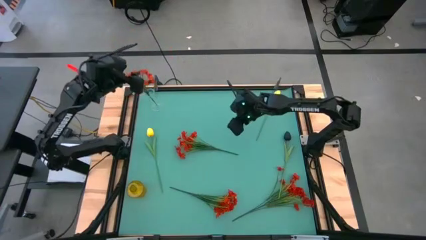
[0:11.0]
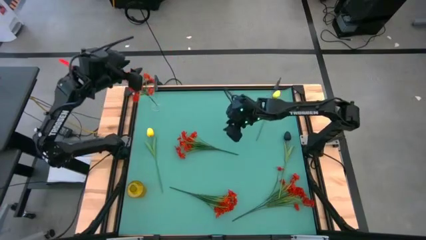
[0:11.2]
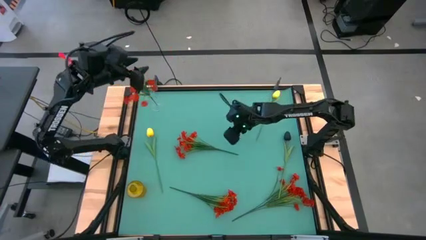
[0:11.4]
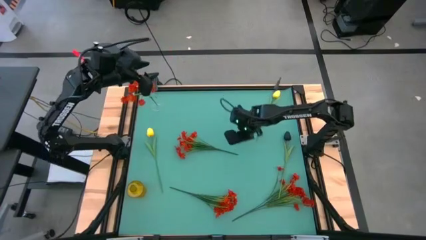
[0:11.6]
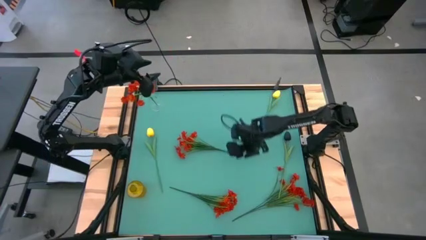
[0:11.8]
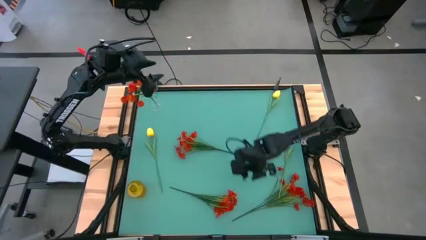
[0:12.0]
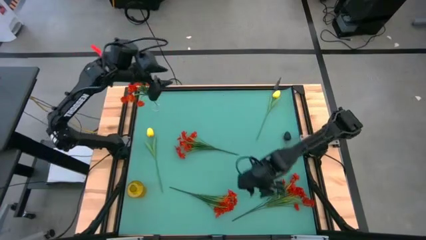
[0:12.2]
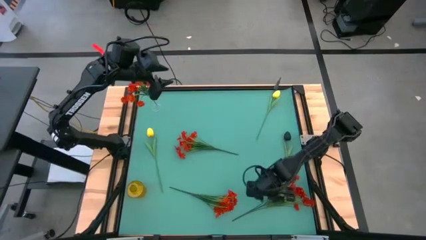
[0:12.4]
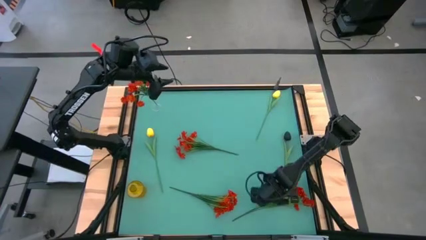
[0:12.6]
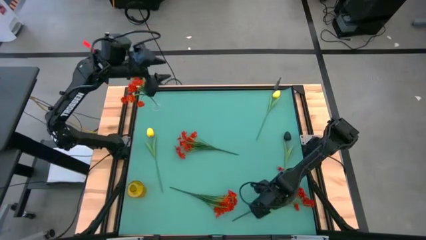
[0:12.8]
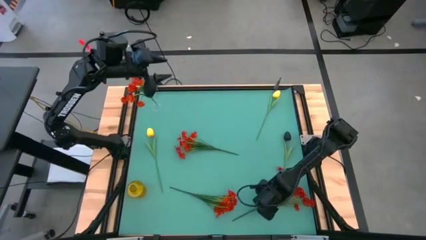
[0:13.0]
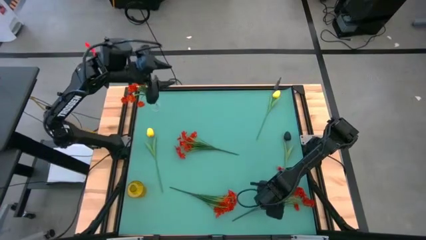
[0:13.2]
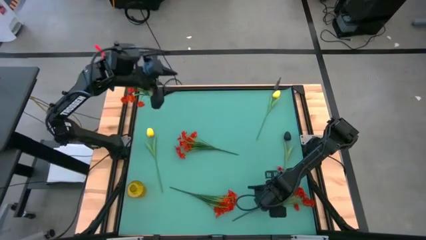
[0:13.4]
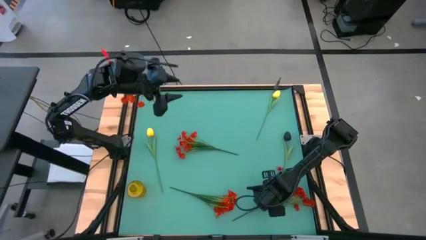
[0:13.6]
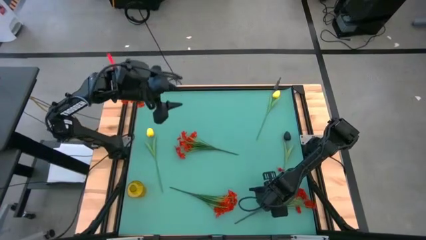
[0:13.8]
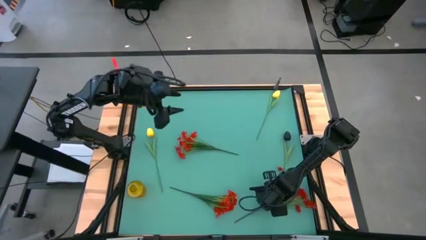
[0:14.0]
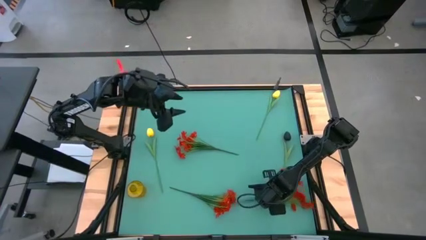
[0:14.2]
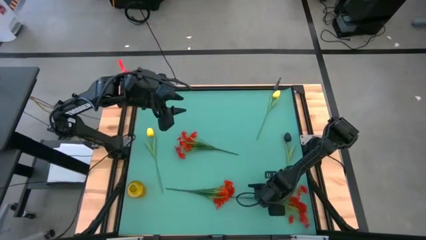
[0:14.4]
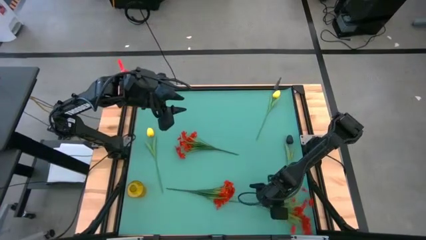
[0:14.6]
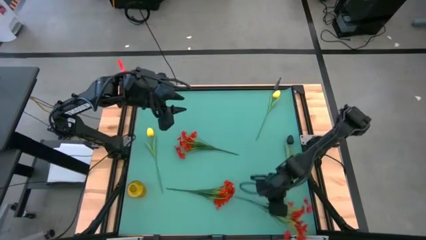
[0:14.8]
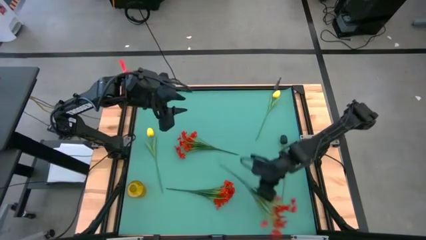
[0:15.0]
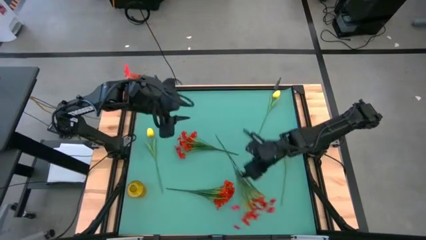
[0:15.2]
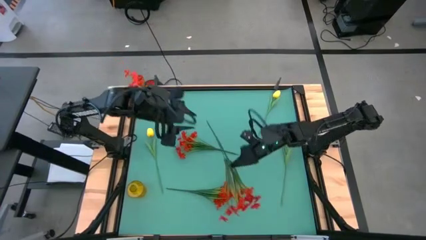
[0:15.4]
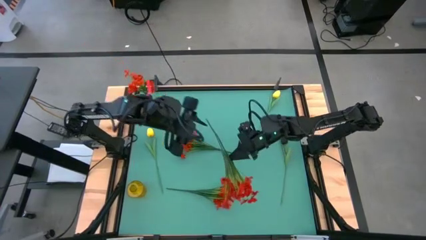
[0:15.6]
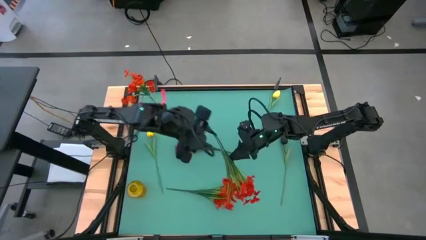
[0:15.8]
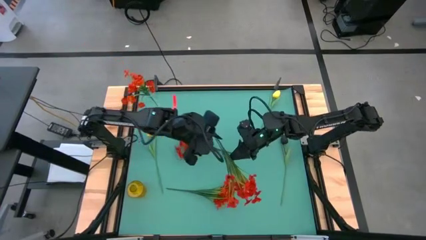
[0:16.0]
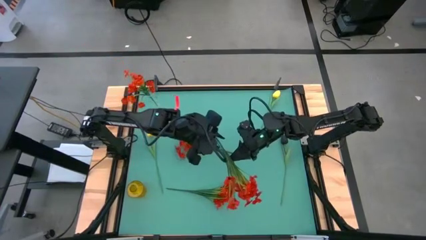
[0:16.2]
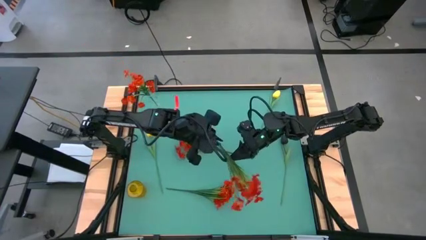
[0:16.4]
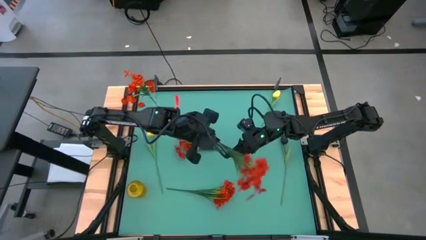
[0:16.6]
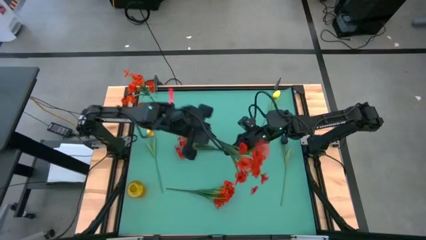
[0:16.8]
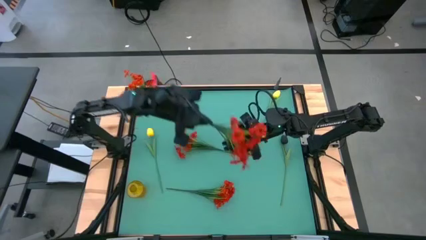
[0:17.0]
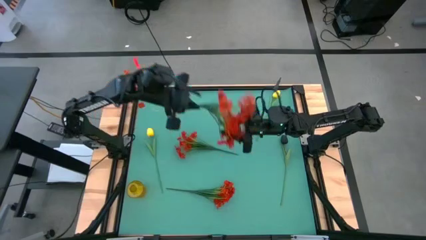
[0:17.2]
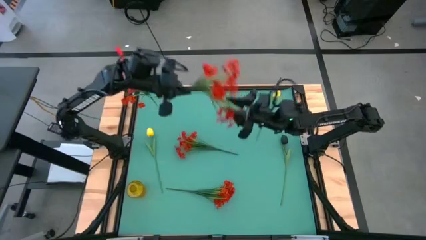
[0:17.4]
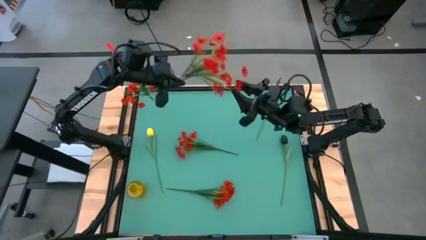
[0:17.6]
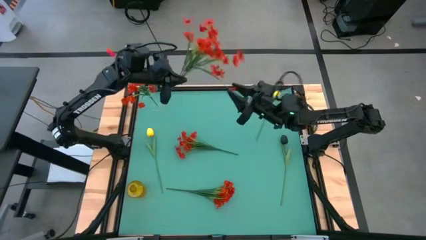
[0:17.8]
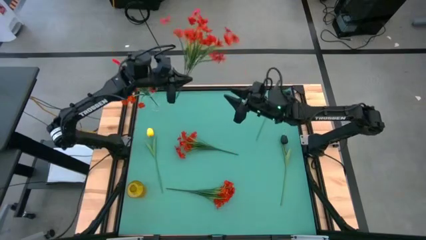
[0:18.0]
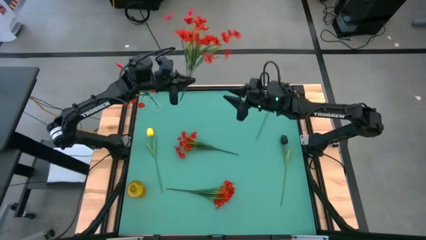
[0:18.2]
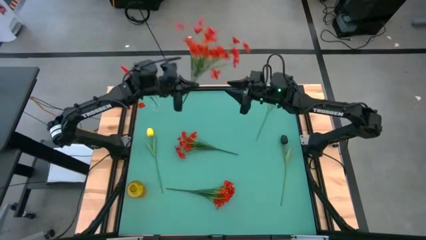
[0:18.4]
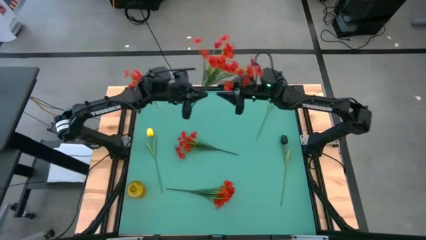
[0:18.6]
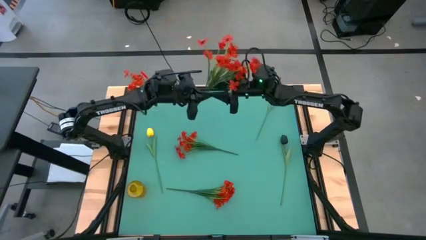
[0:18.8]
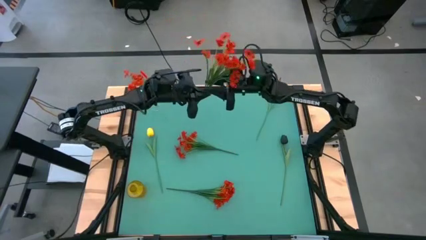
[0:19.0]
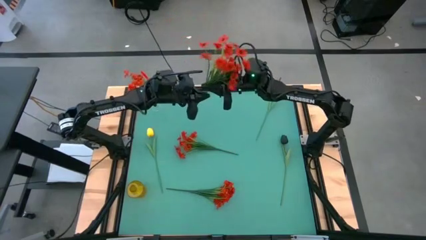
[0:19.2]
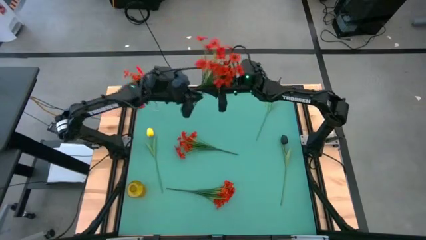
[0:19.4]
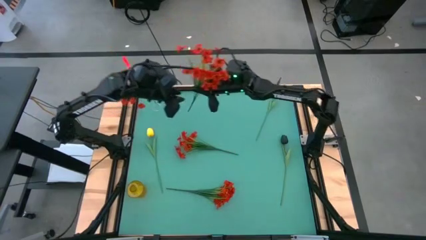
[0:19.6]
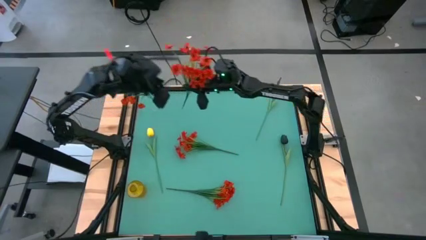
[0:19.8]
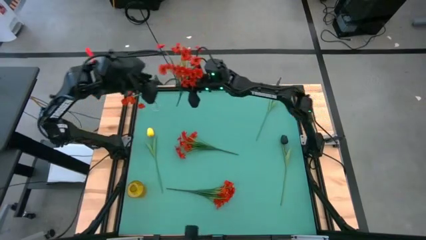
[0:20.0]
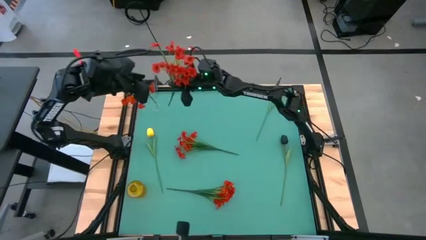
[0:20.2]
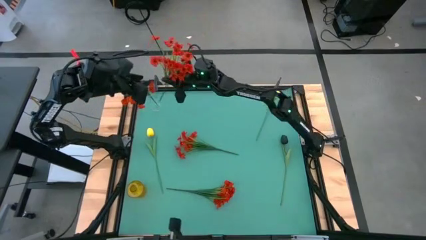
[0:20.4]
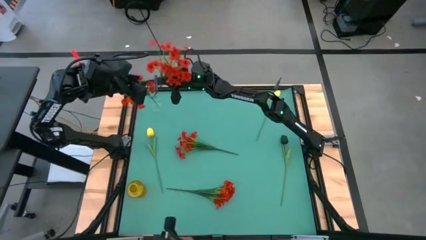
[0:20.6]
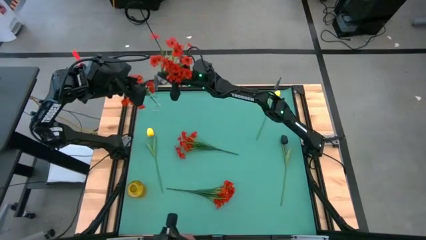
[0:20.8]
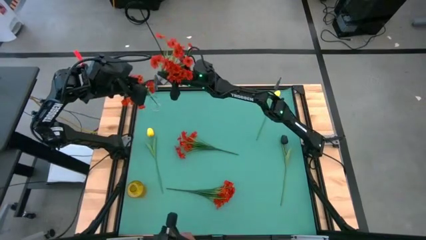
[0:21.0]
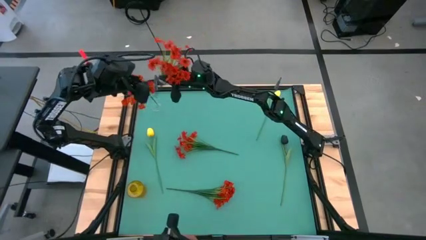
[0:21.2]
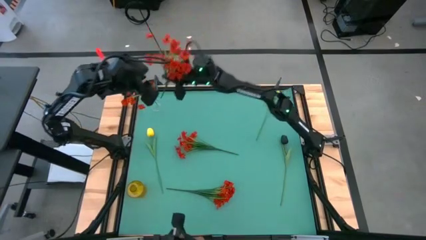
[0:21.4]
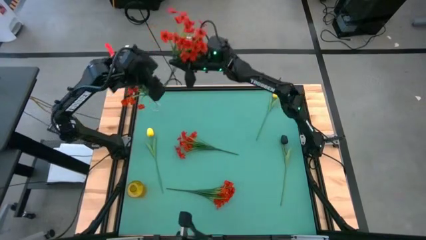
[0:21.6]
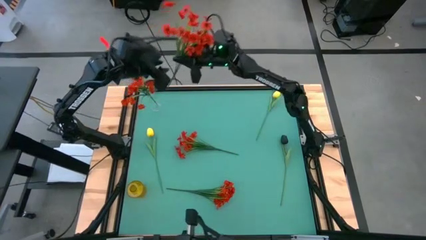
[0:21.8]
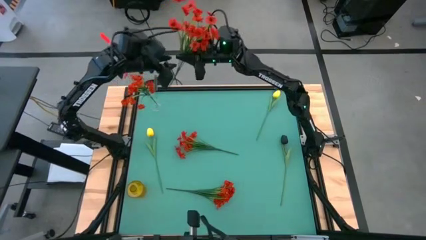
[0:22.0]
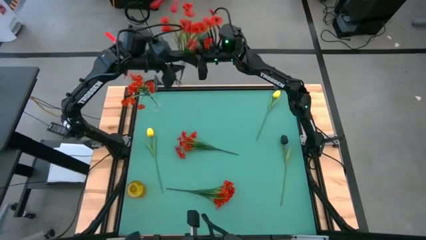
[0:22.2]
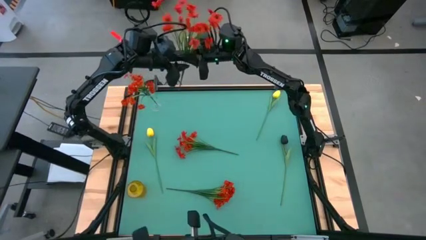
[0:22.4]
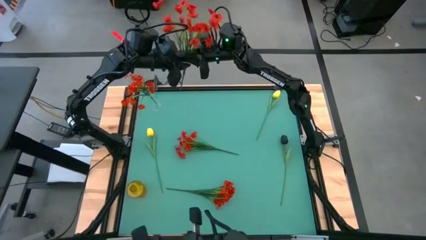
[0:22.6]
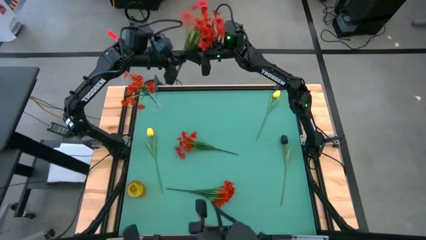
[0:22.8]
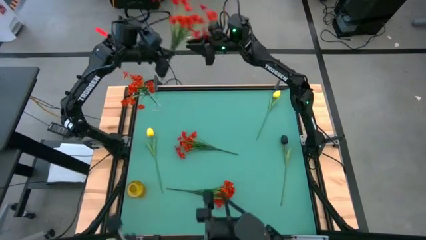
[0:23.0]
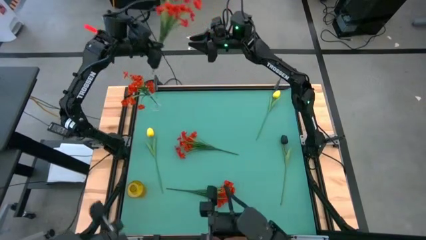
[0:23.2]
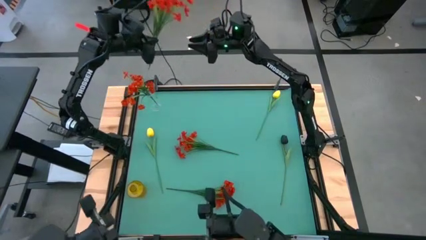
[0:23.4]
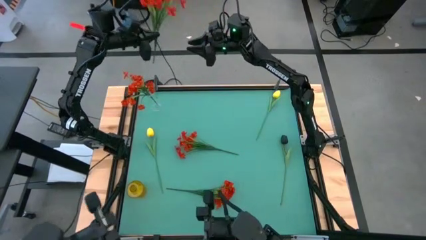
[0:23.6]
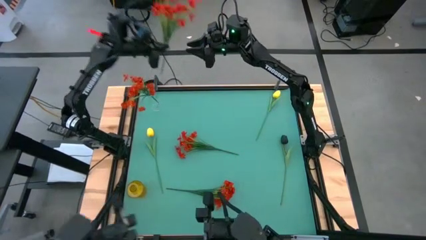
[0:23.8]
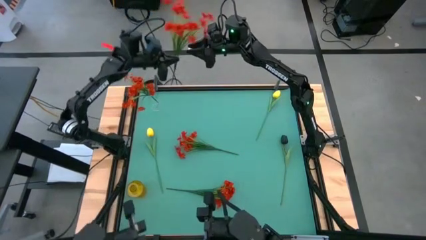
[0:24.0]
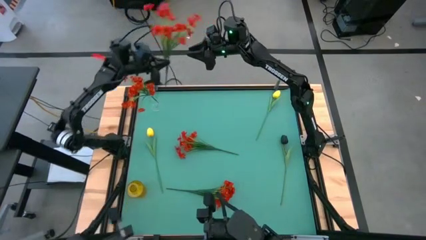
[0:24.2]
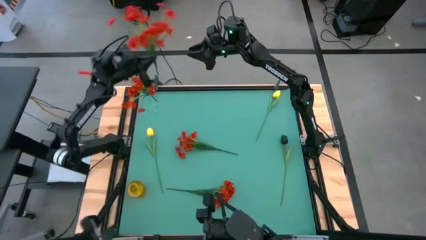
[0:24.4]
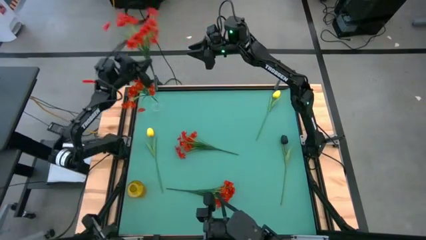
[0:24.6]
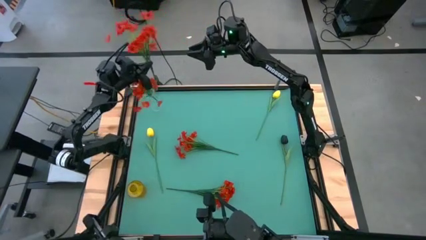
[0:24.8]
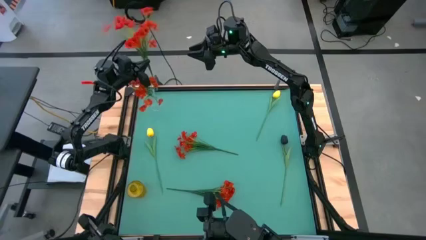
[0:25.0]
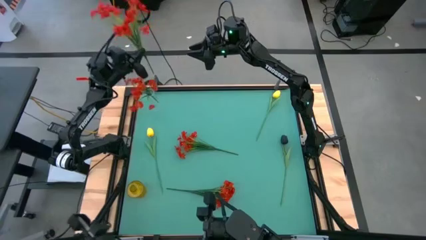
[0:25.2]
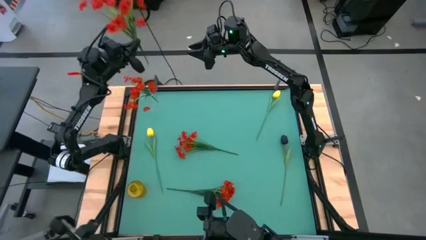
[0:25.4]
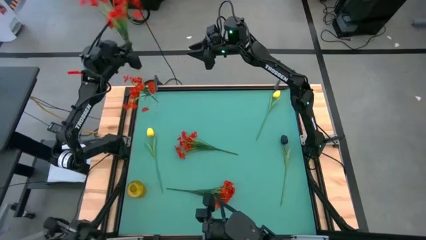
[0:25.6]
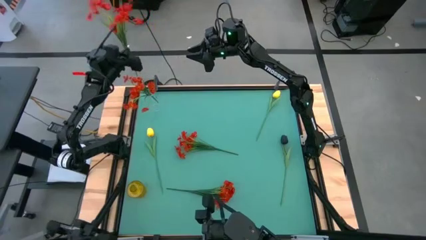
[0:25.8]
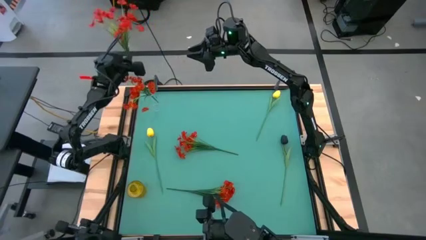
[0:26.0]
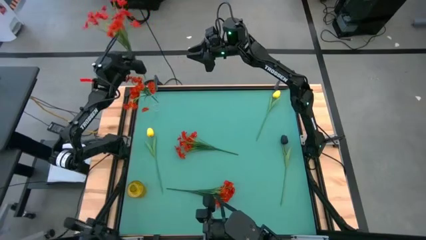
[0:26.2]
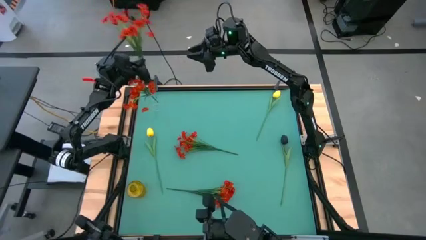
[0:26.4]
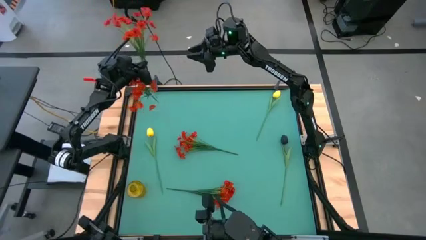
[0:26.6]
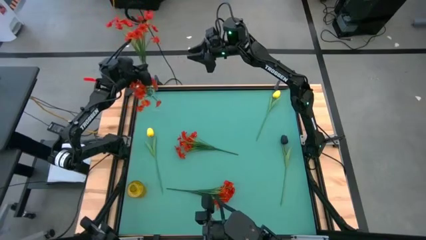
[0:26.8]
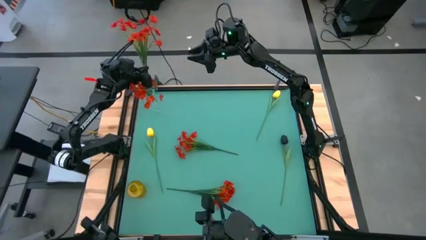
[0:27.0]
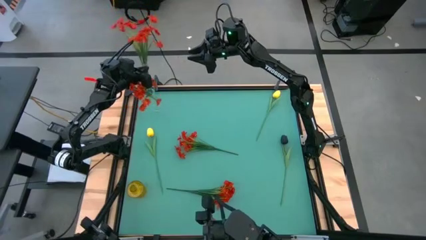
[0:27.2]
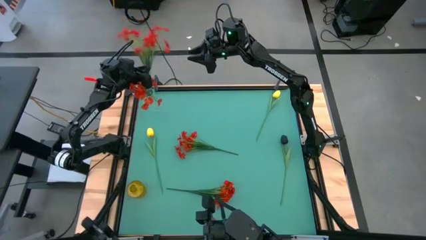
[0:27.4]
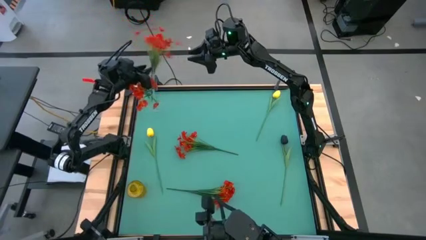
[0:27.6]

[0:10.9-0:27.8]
Task: Sort flowers into vase by color
Put the bottom right red flowers into the transparent vase
